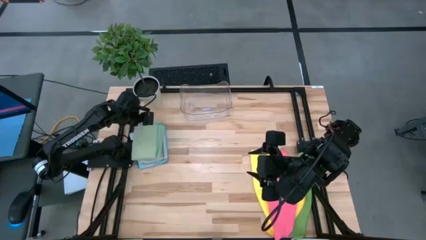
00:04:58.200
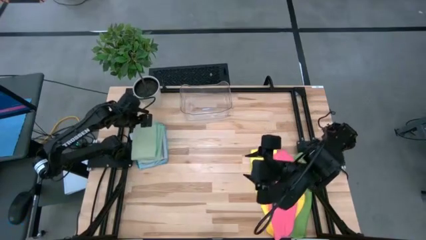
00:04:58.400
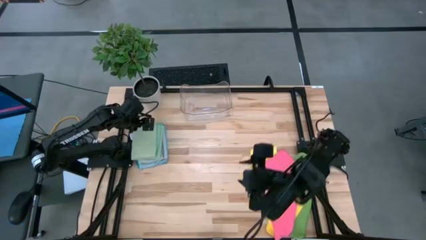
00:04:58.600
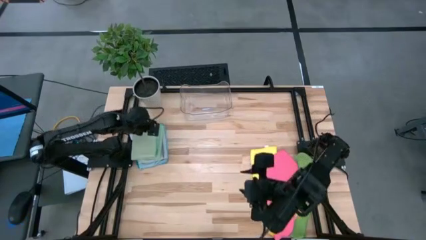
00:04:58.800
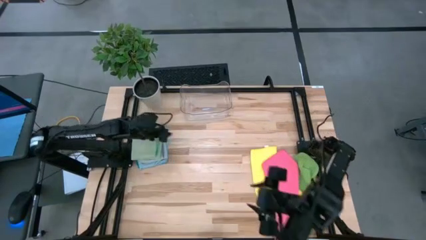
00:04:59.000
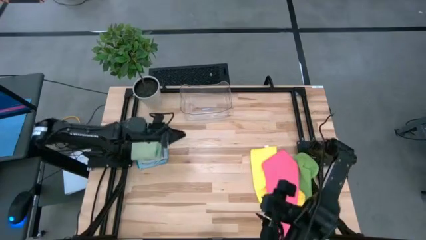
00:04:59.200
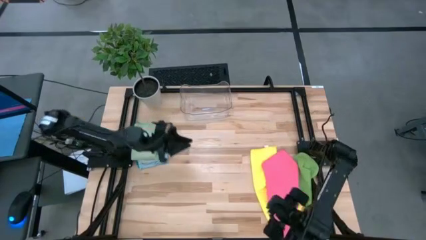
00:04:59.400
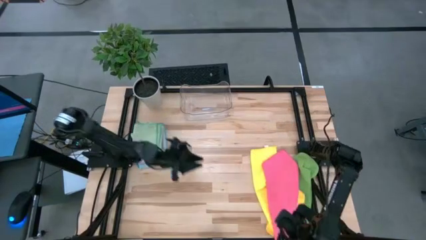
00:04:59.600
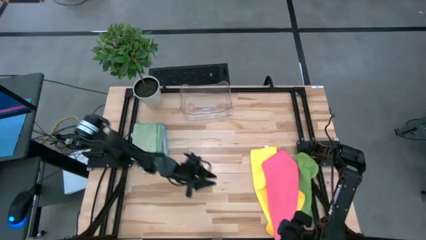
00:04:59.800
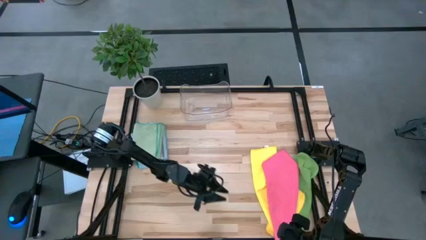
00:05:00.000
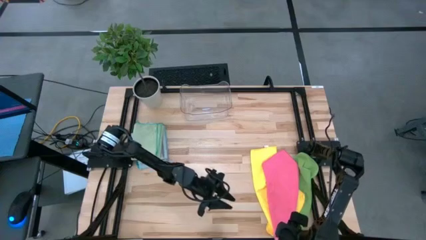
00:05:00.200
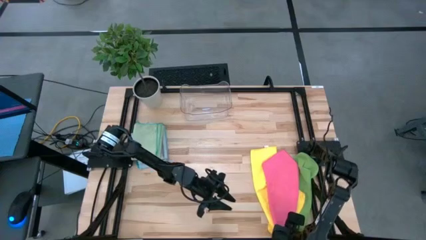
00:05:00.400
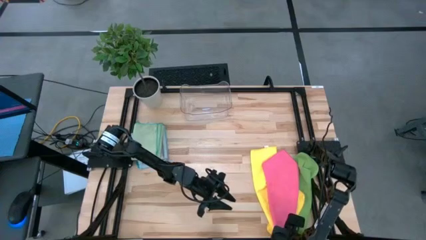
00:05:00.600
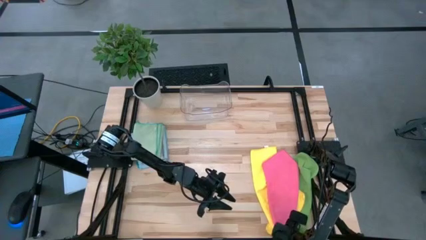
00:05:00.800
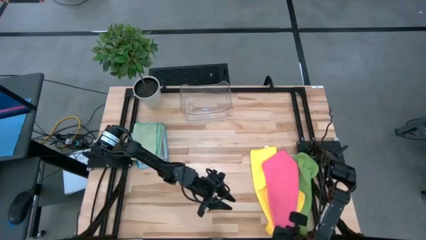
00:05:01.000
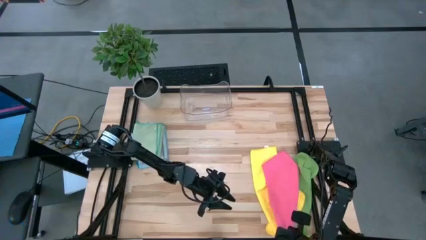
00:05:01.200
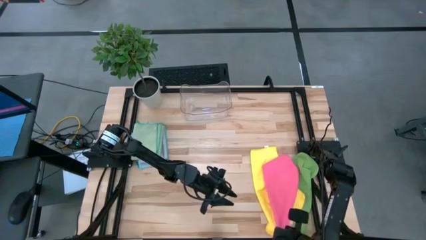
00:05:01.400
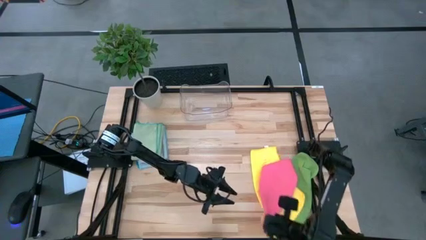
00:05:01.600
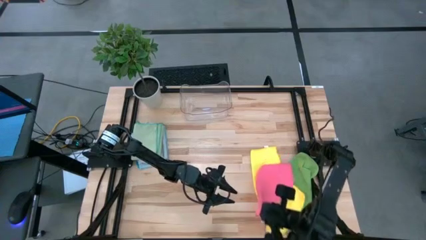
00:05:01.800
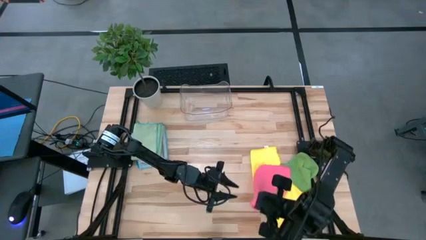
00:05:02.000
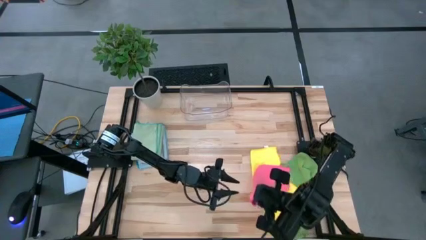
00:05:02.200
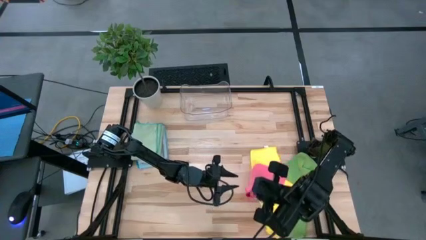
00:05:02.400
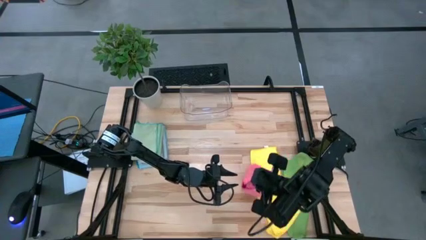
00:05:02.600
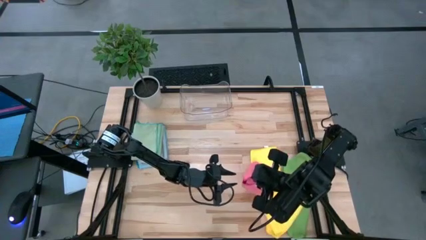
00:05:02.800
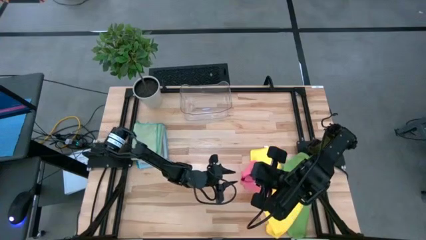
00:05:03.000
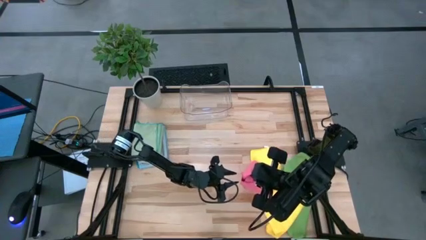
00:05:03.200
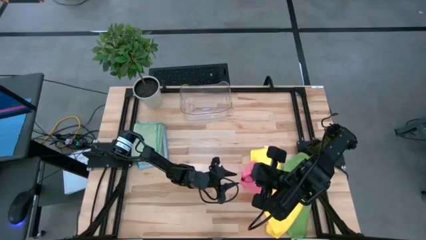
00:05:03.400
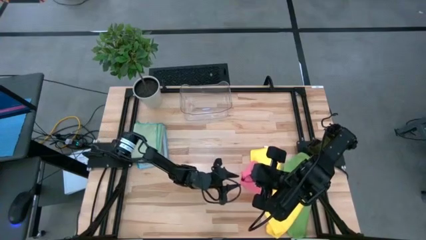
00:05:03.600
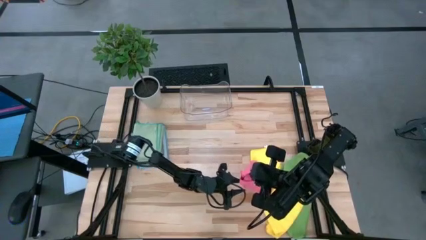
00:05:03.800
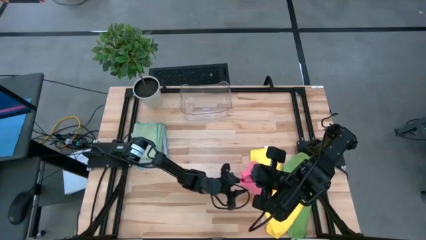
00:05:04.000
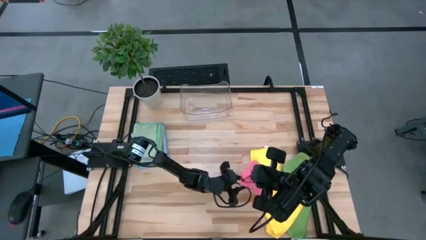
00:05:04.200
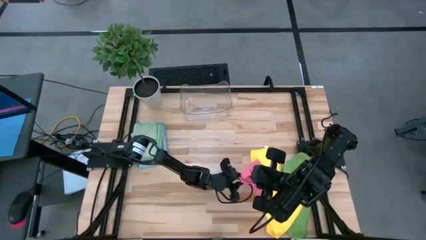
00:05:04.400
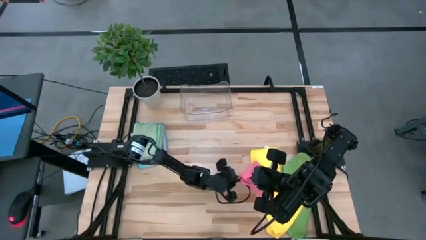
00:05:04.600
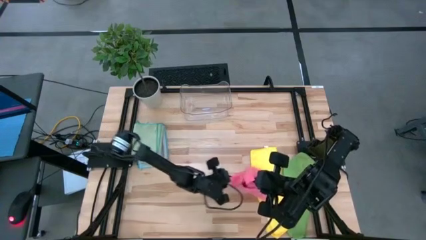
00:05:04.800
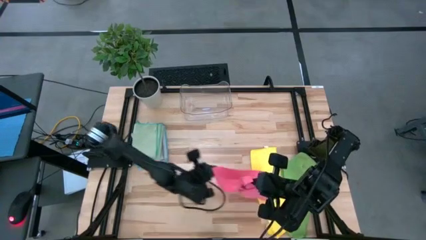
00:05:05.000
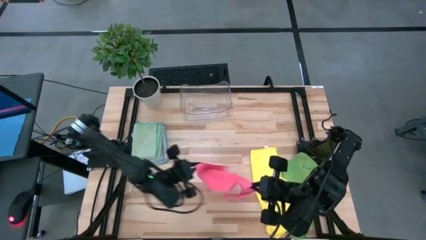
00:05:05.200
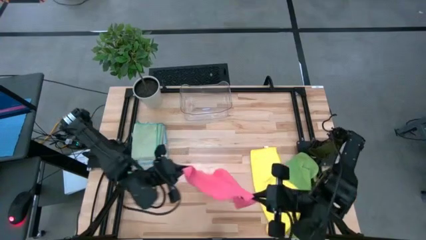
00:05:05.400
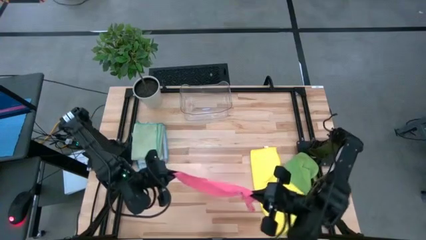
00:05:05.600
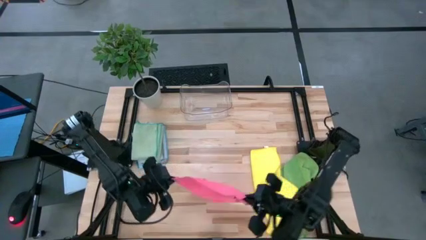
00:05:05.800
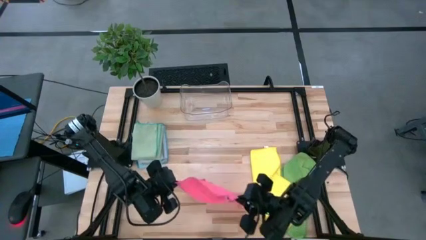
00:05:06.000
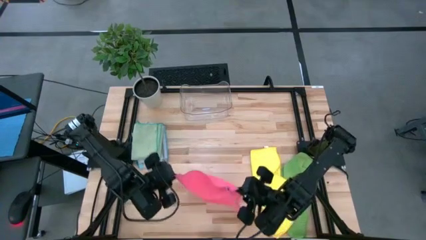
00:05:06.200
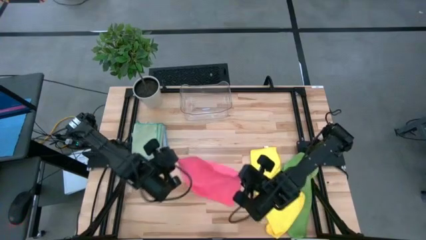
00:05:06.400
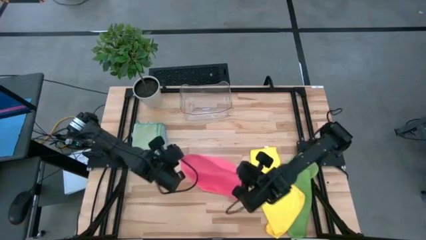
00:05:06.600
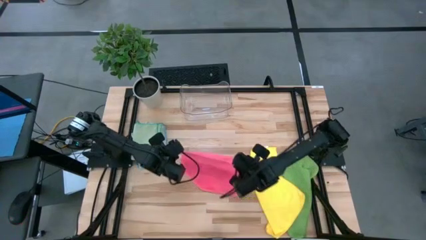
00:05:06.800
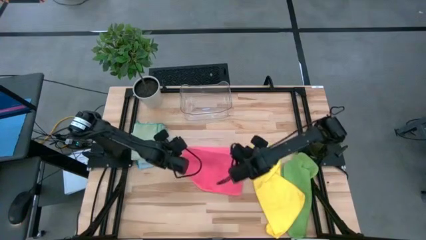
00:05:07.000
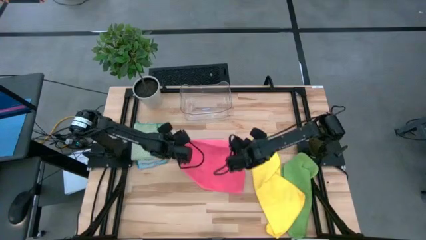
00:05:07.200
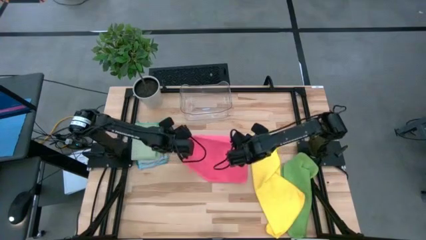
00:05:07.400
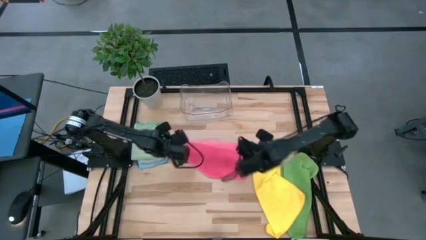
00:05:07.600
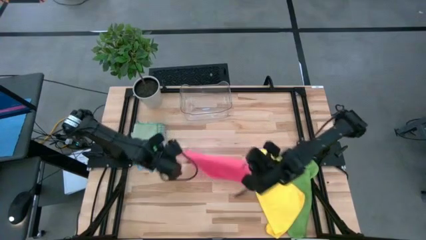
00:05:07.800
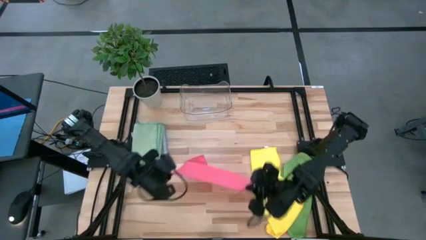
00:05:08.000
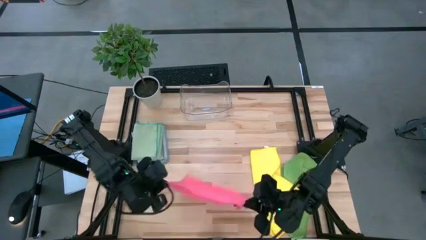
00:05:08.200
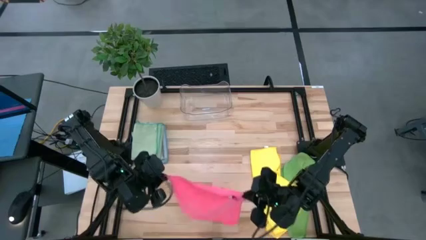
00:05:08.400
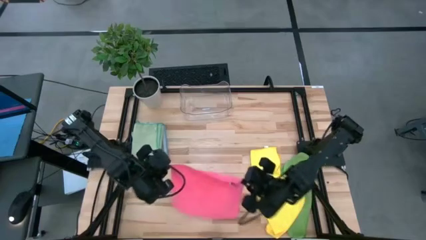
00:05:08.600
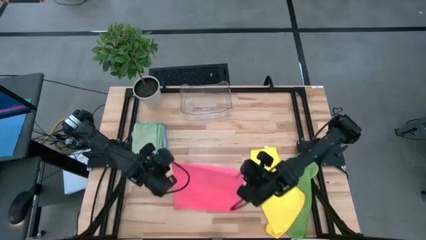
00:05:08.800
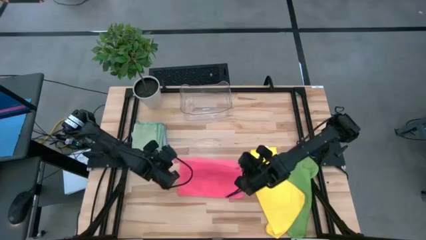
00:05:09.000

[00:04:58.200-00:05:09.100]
Task: Fold microfiber towels
Fold the pink microfiber cloth

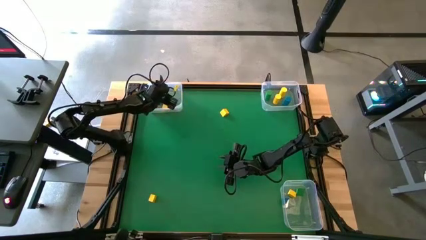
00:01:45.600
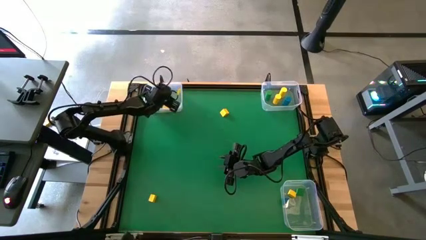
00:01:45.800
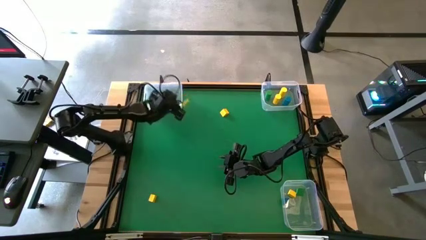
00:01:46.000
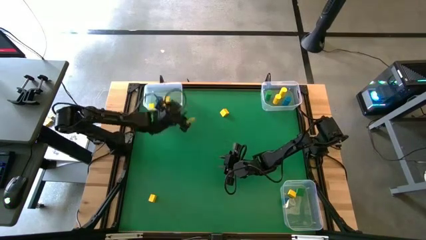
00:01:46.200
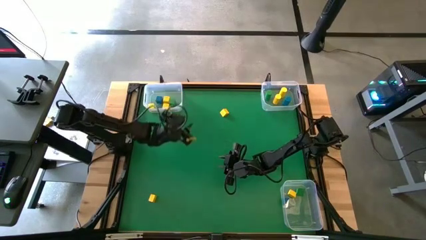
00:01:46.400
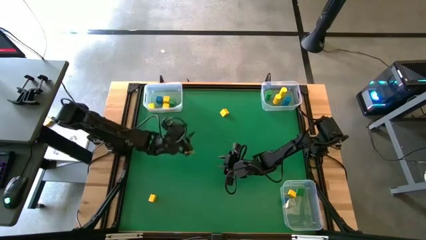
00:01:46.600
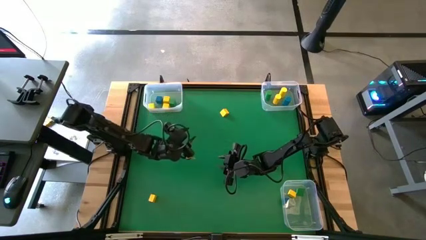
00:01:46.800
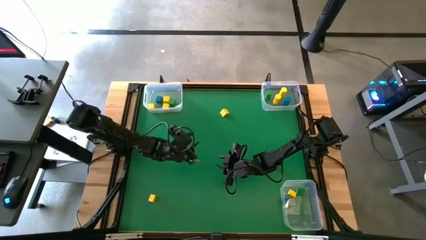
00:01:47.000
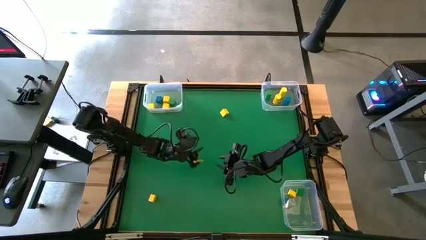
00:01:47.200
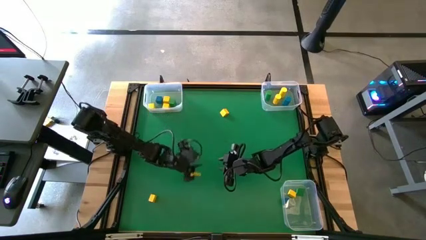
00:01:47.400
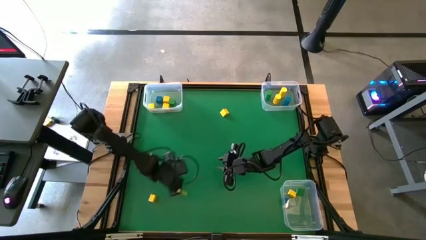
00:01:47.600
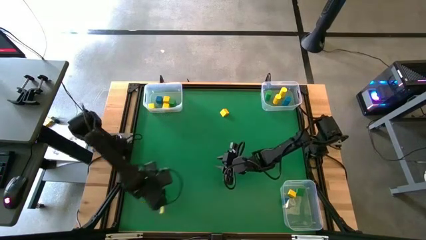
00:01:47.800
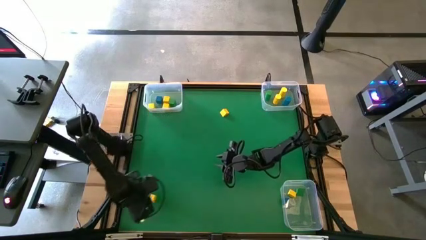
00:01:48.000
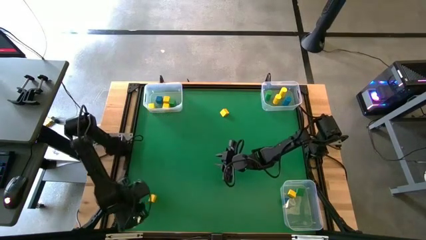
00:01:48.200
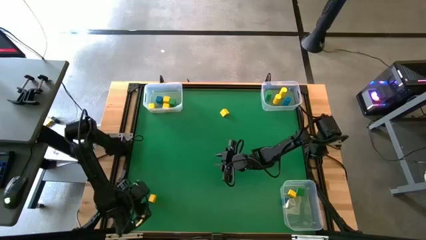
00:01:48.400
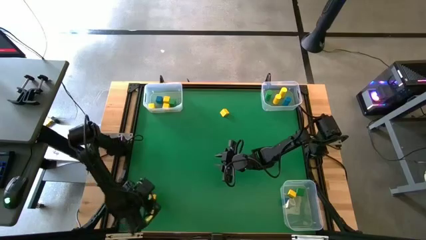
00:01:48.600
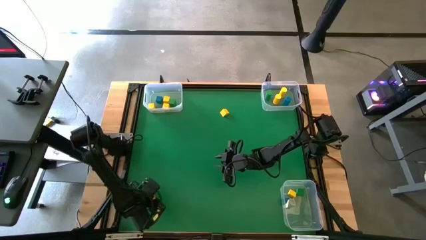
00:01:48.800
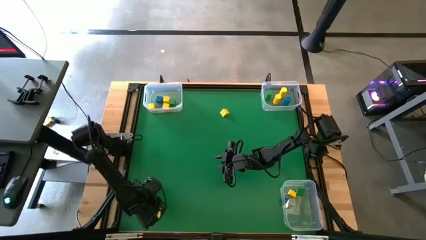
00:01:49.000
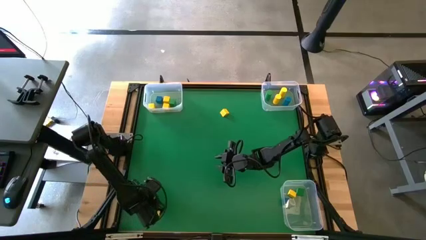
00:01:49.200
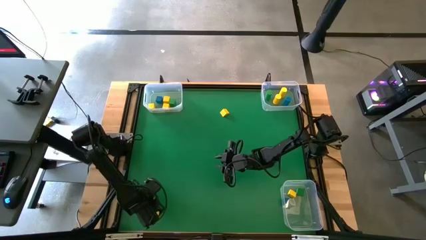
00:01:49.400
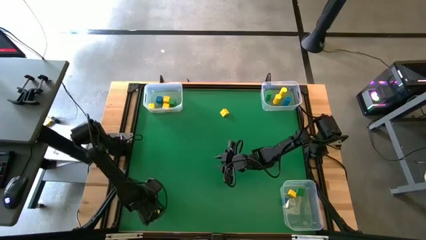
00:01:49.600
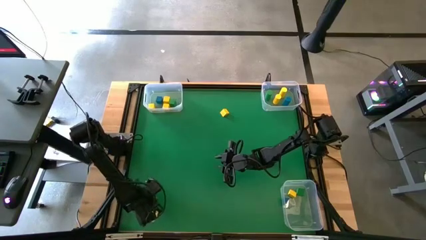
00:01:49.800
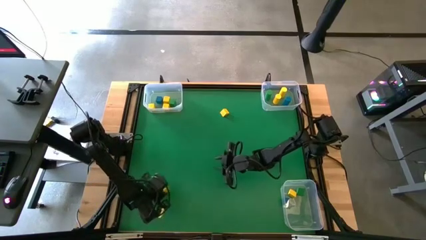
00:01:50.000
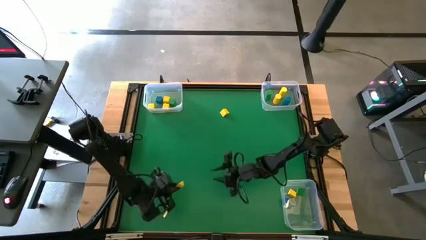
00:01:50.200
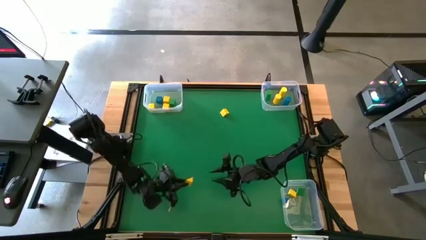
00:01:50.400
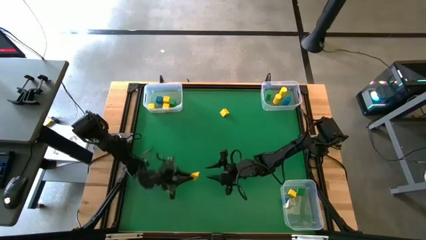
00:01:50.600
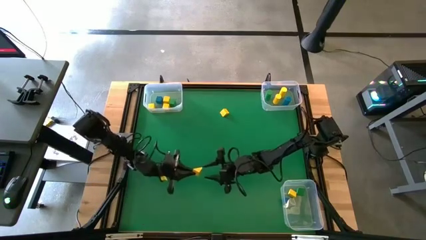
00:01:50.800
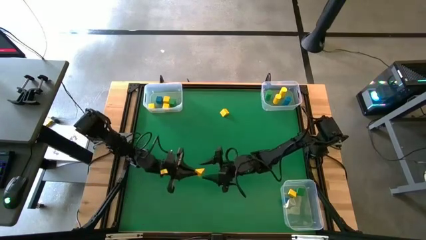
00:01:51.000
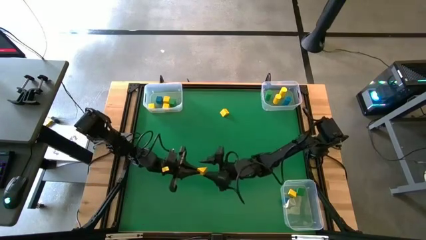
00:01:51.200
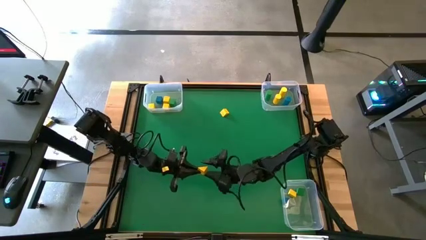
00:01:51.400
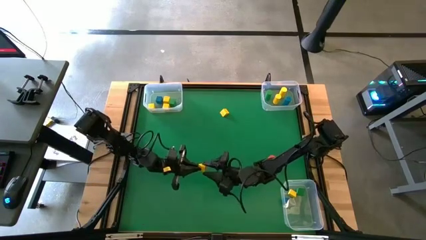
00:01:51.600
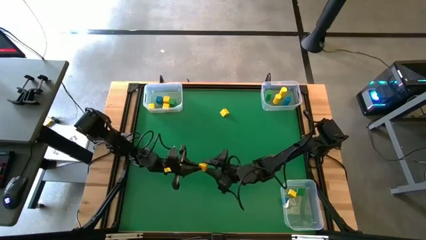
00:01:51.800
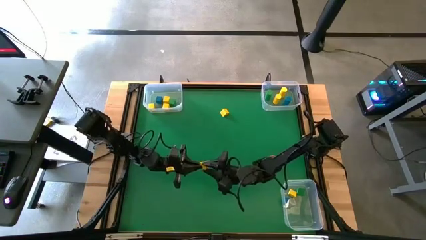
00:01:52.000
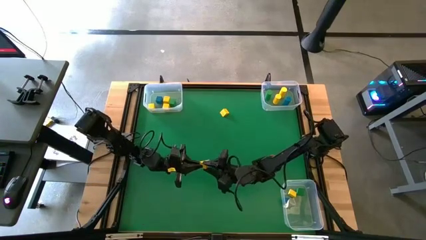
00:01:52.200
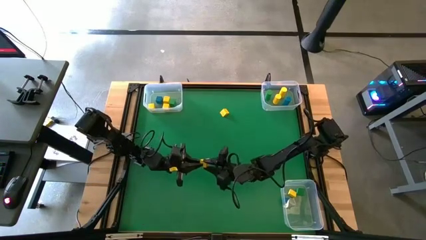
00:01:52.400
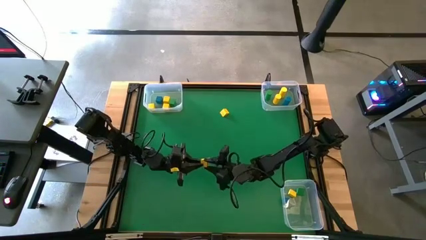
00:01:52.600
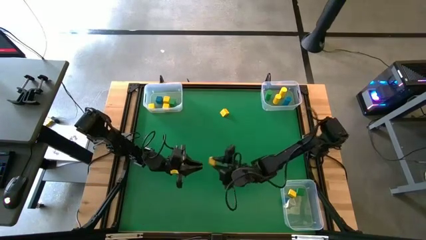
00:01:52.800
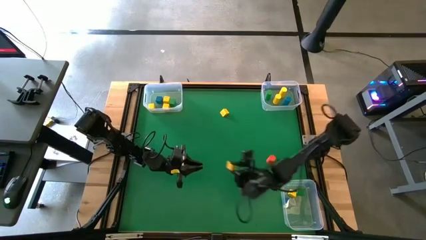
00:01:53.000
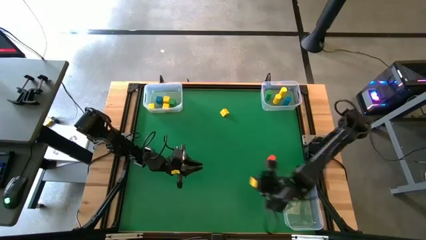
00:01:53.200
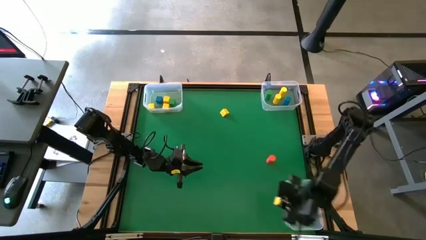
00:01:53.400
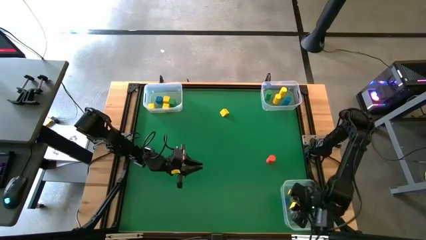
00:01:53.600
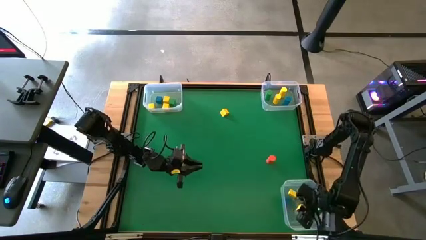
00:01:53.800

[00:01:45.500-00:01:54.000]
Task: Sort blocks by size
Put the yellow triangle block into the bottom transparent bin
